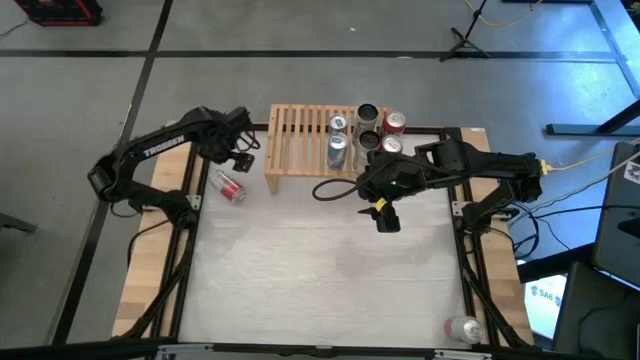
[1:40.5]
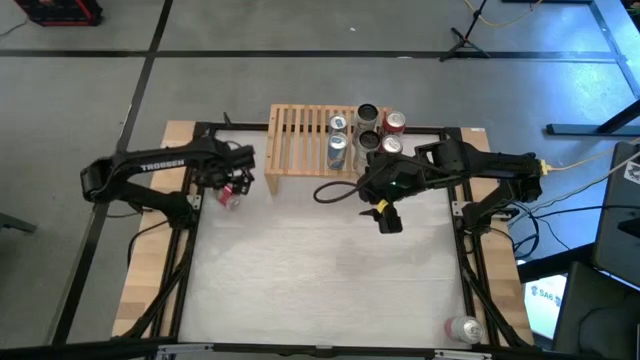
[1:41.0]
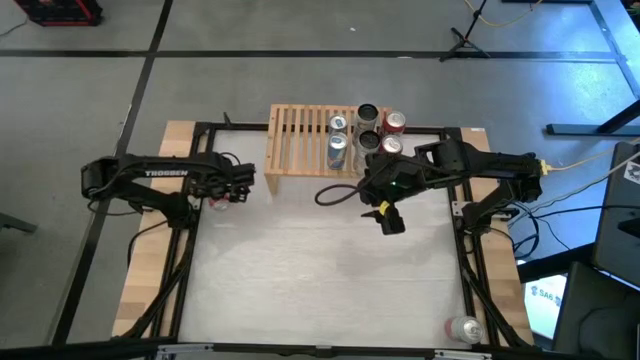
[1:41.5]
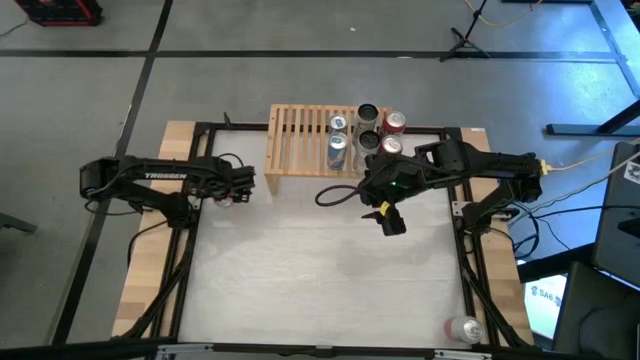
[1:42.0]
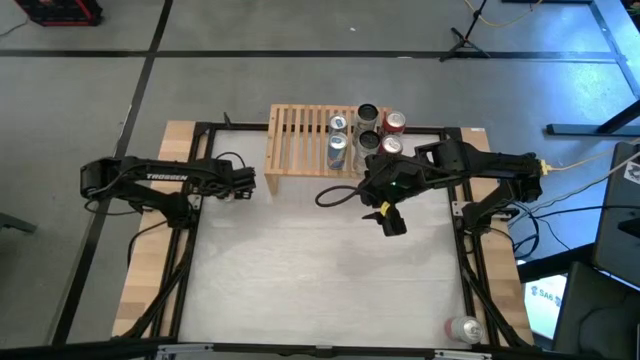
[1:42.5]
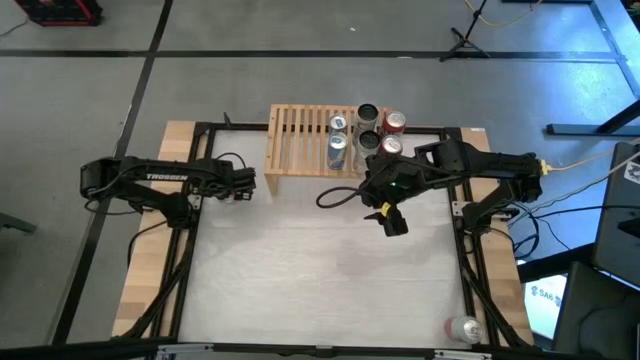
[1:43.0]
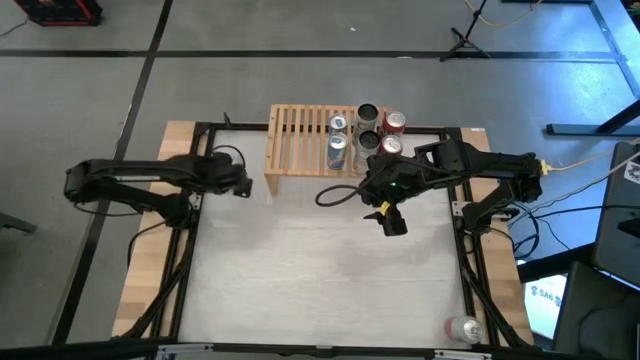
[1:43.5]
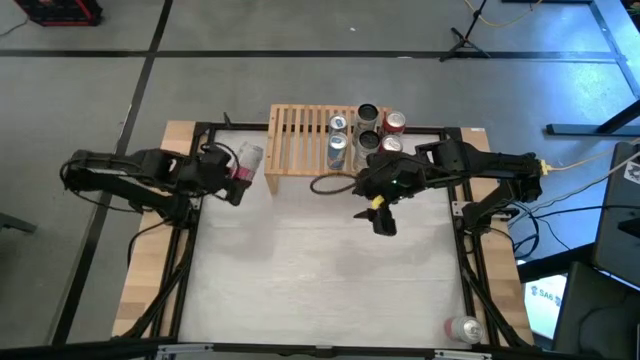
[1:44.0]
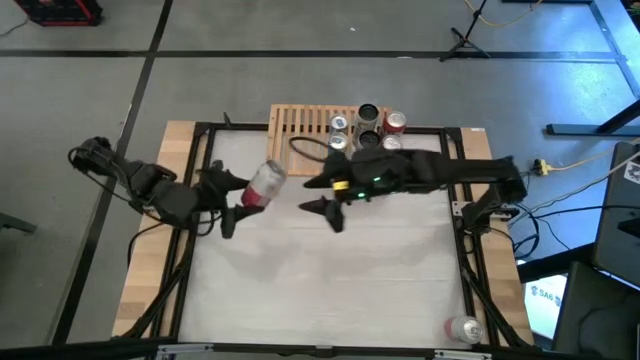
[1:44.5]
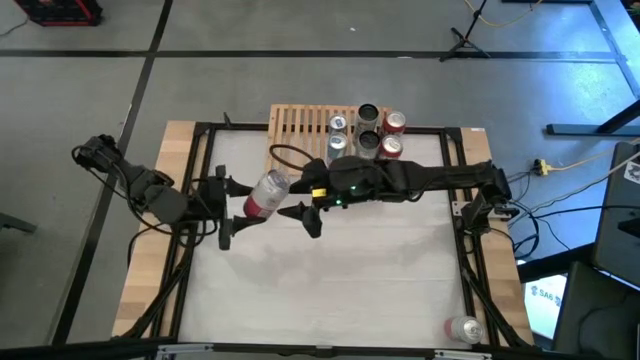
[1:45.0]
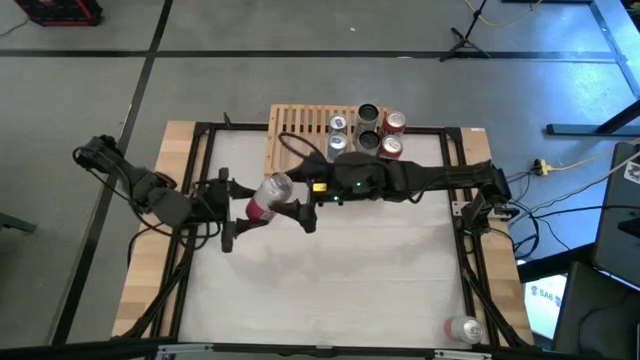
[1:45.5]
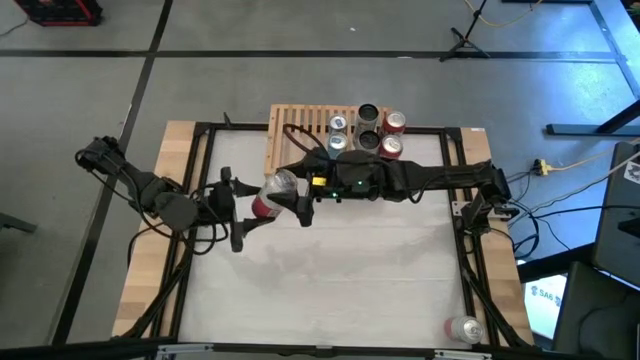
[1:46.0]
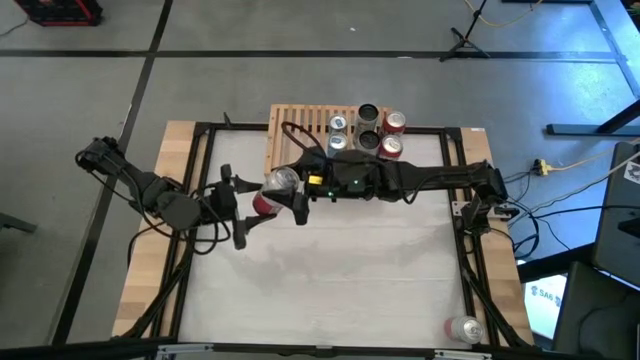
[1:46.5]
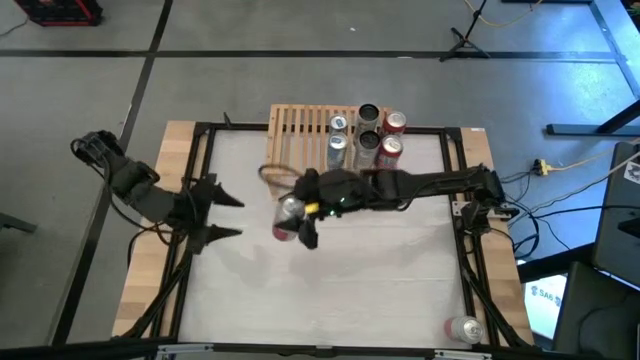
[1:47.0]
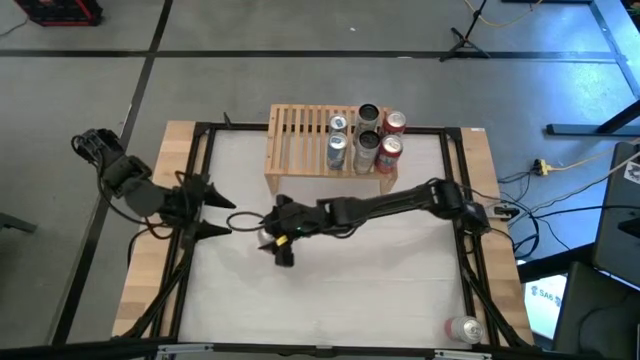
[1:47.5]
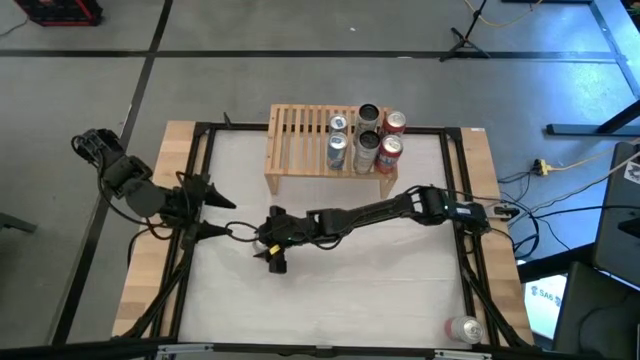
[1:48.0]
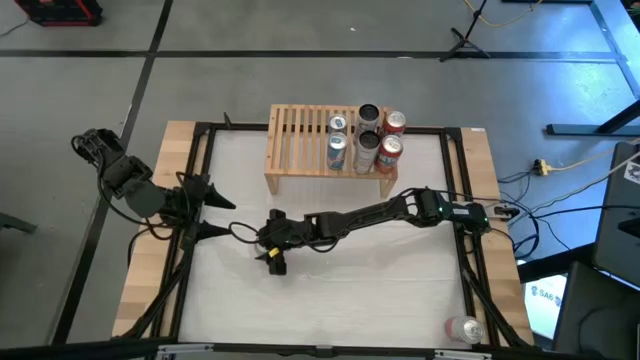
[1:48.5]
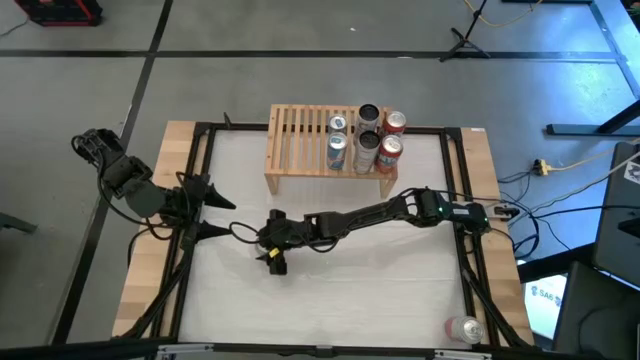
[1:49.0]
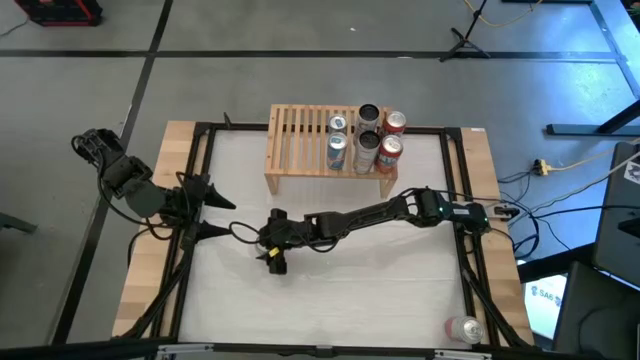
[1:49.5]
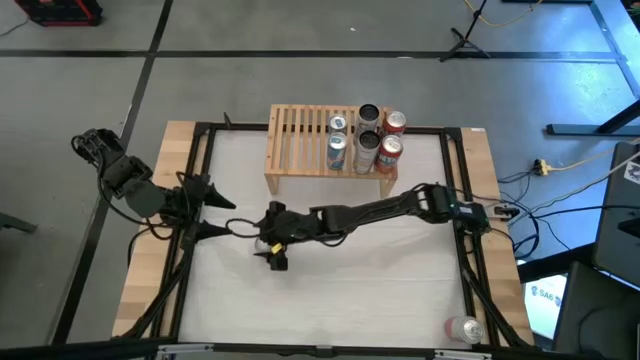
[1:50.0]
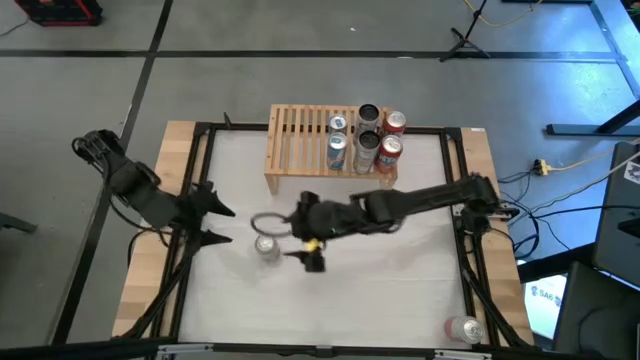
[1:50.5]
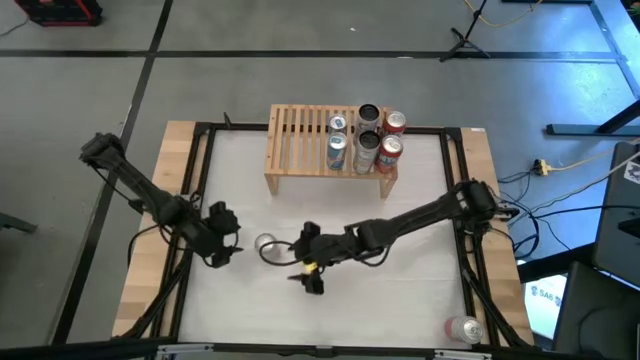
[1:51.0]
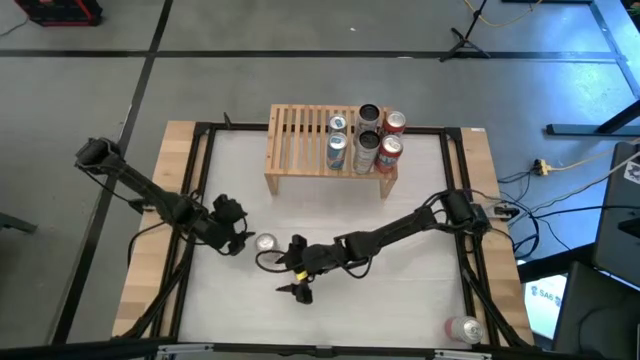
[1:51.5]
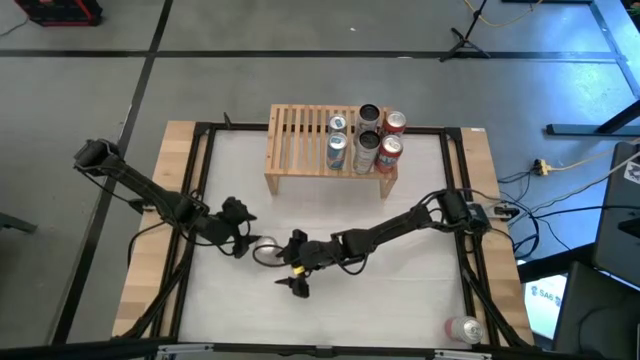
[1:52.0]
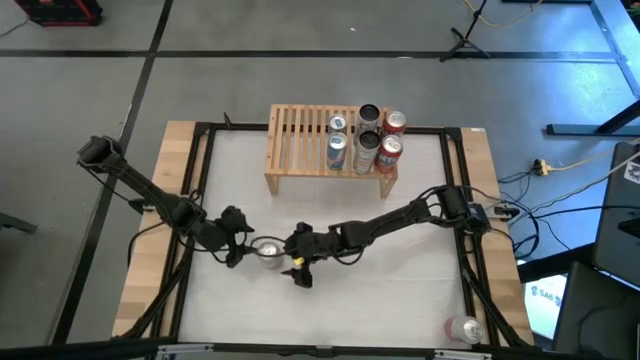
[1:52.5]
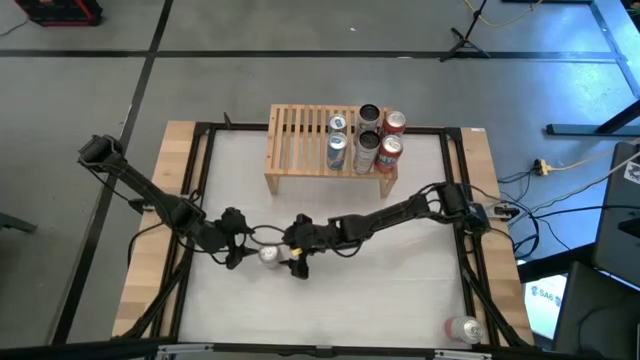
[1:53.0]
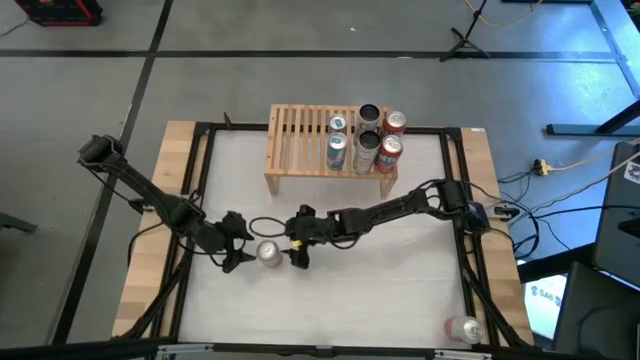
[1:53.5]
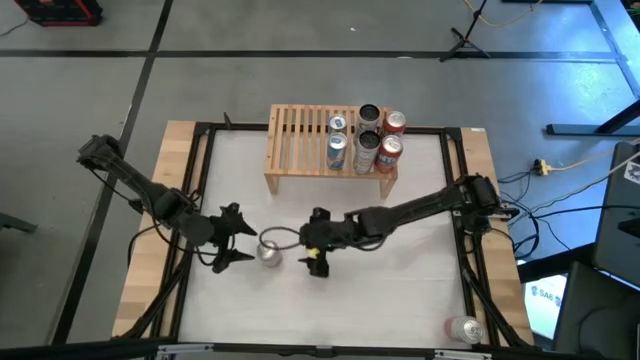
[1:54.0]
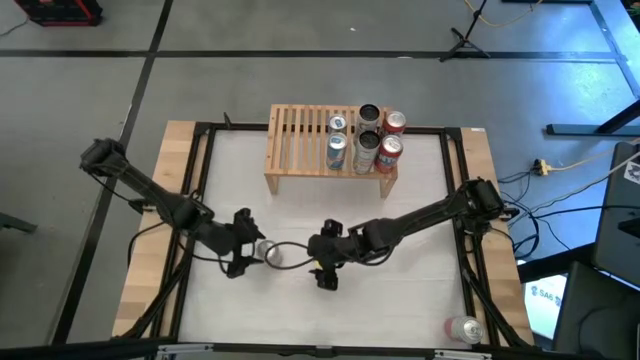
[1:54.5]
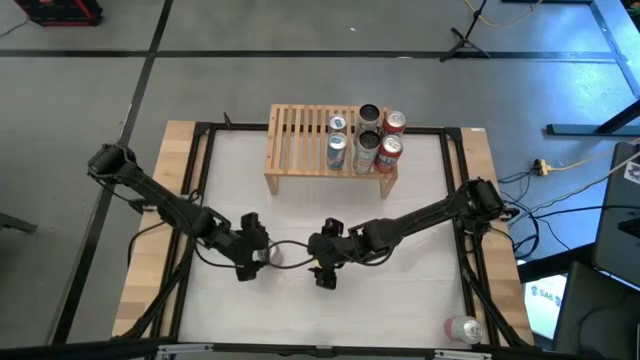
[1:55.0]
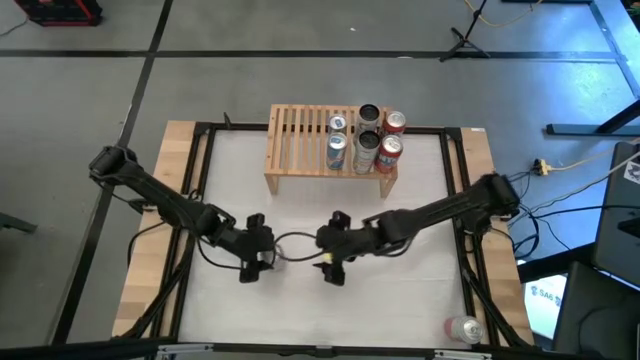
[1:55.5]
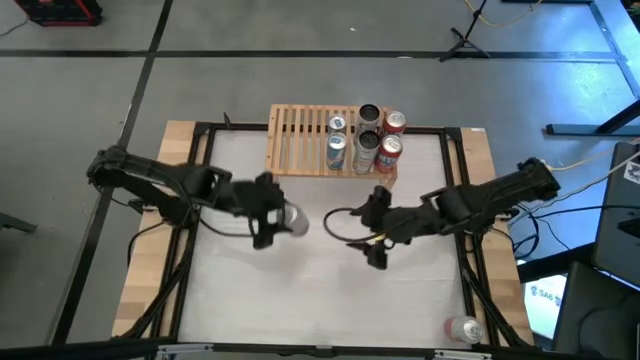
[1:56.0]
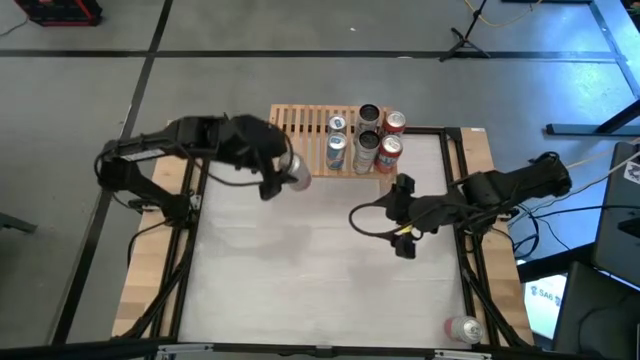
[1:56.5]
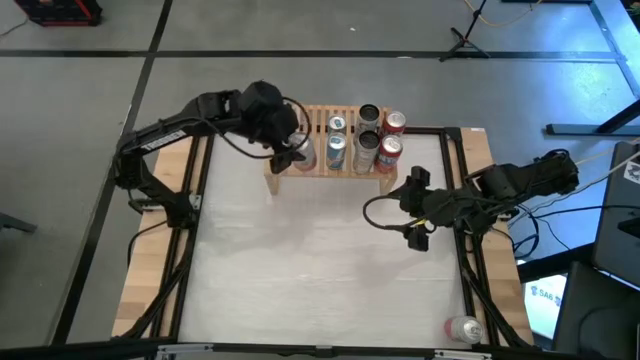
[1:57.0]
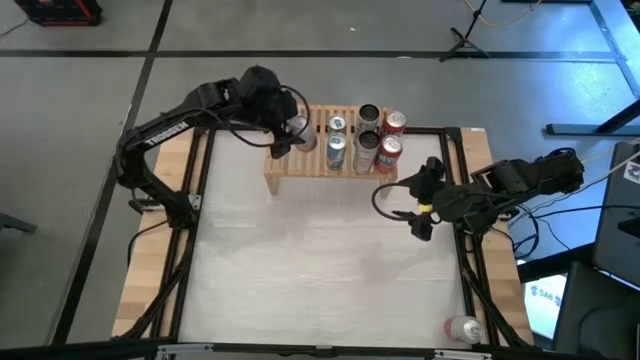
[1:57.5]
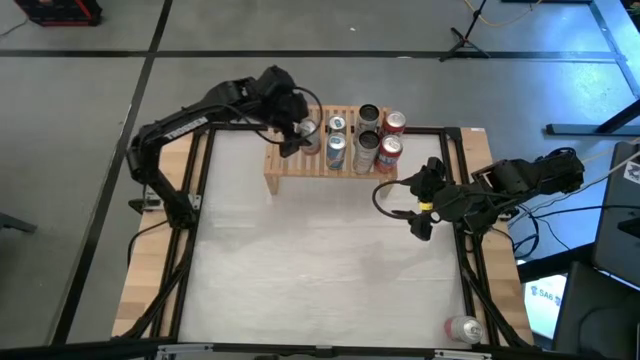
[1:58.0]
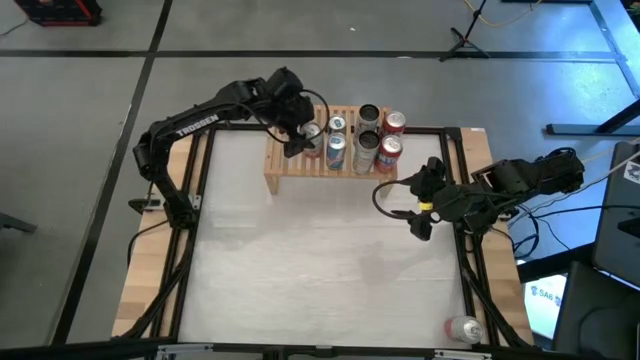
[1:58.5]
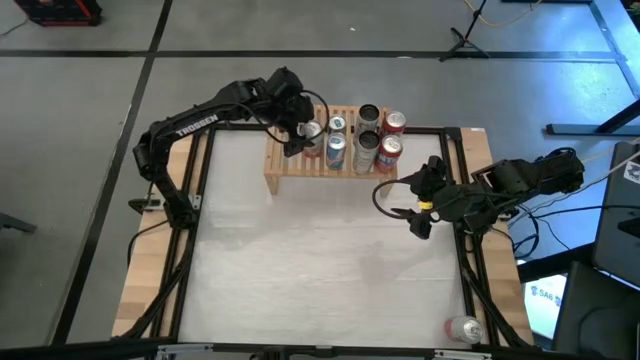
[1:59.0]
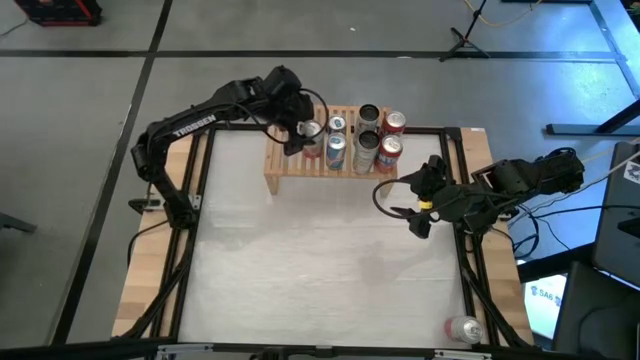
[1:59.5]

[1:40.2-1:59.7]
Task: Place canned beverage on shelf
Put the top pink soda can on the shelf

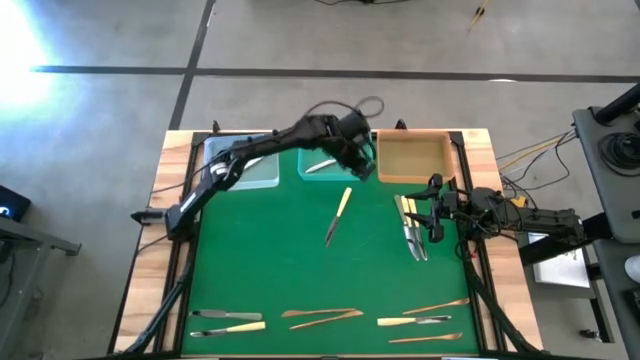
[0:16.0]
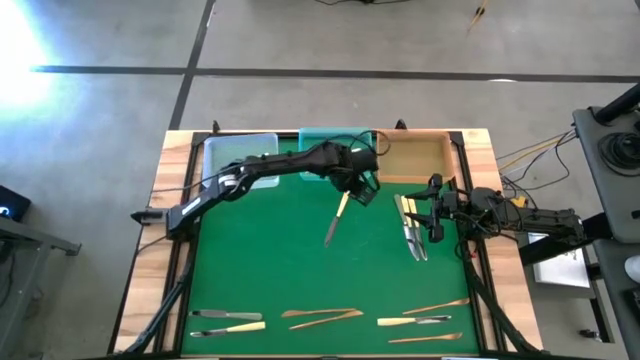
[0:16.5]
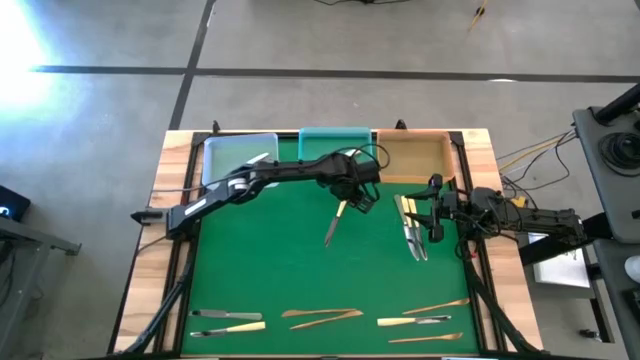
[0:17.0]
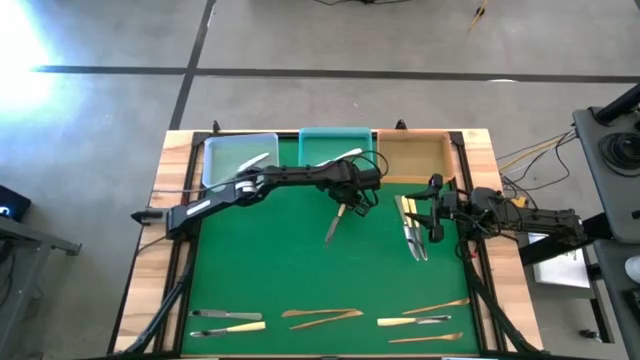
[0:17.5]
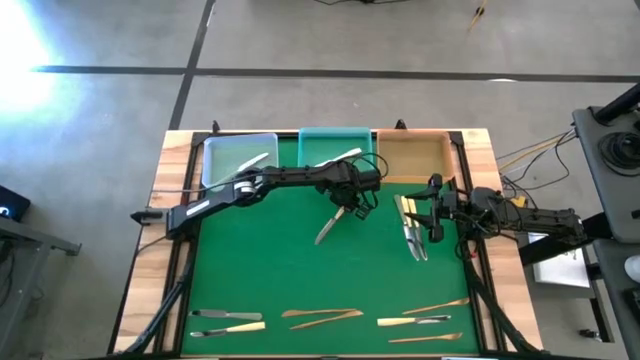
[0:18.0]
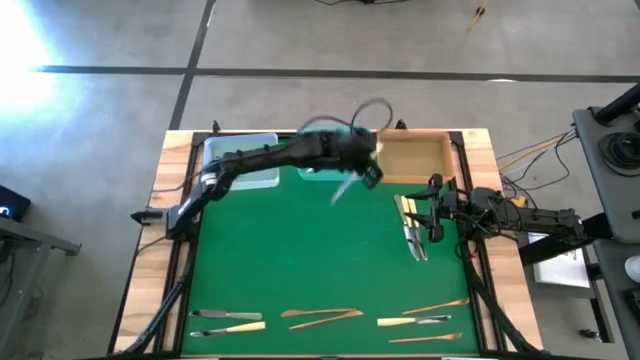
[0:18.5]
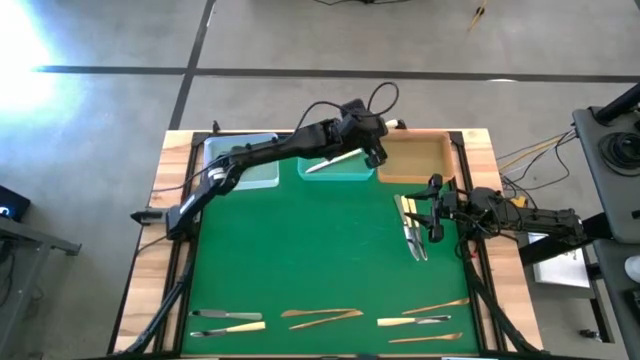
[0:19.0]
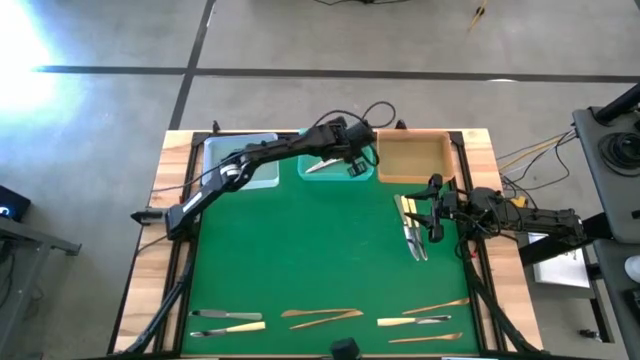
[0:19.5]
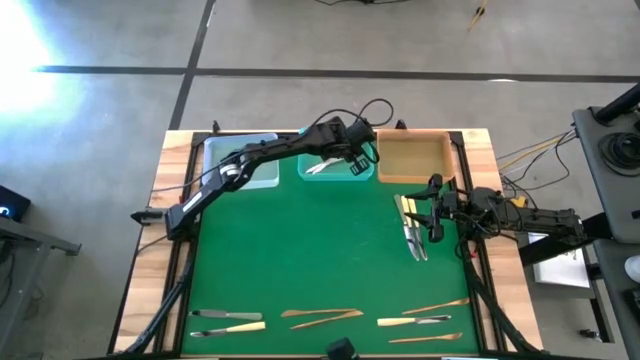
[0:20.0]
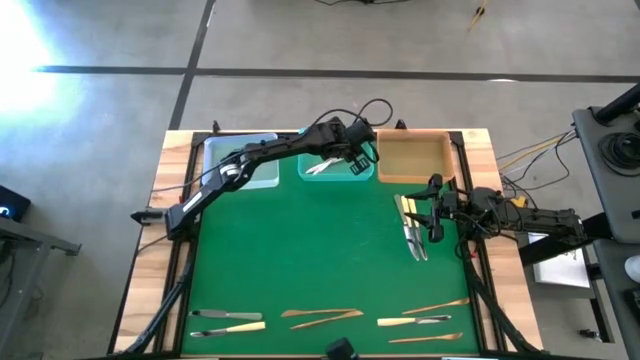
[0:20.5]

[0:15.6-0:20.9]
Task: Sort silverware by color (type)
Put the top center gold and silver knife into the blue bin
